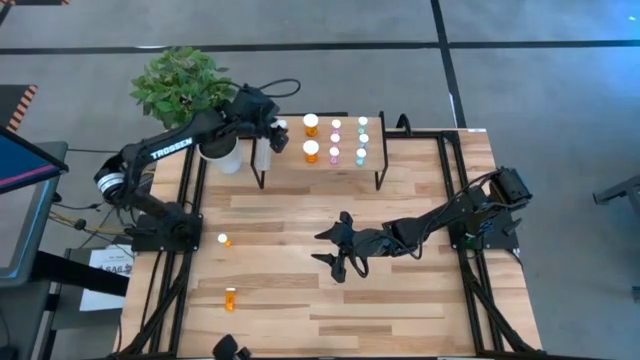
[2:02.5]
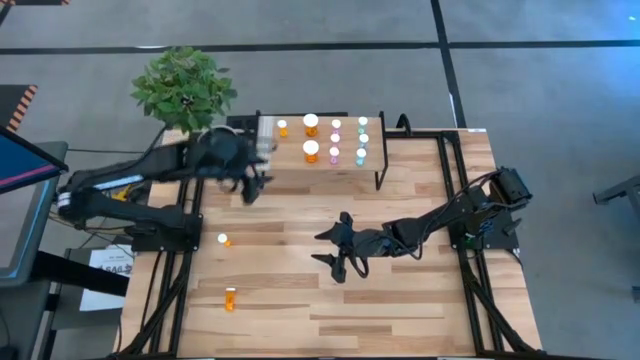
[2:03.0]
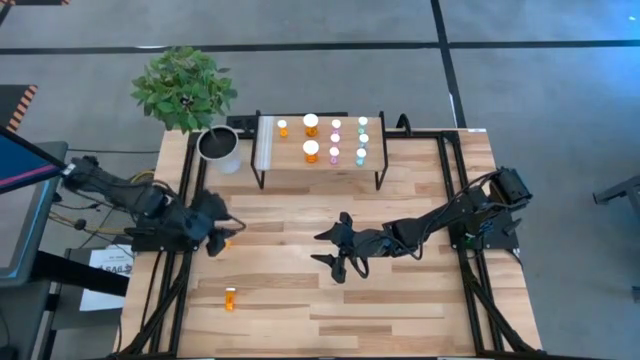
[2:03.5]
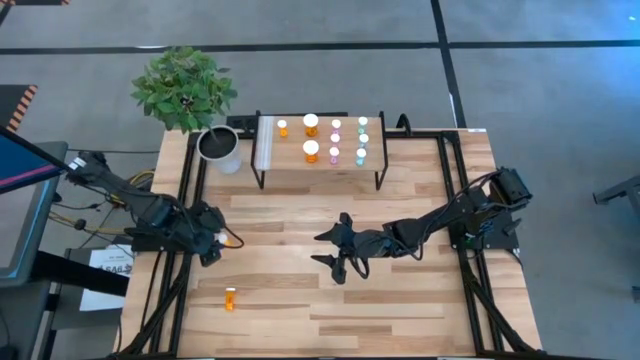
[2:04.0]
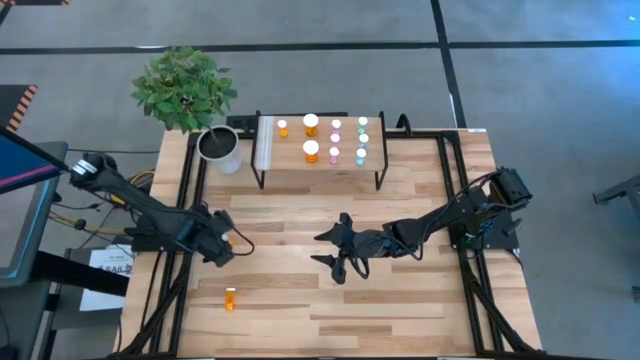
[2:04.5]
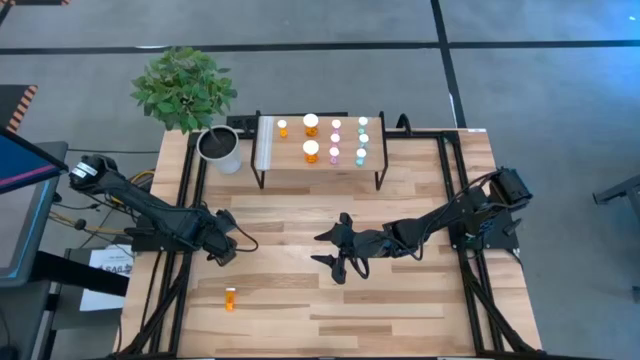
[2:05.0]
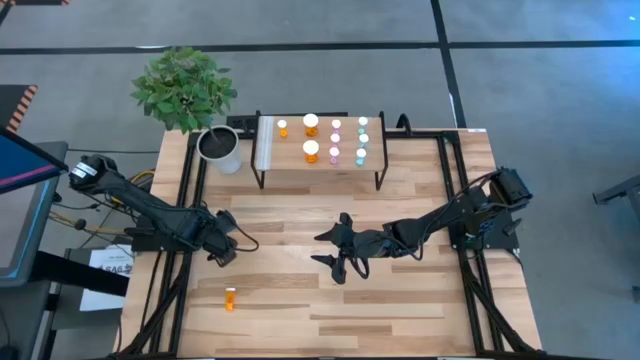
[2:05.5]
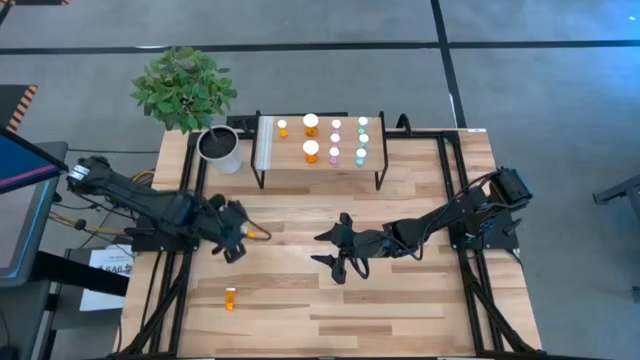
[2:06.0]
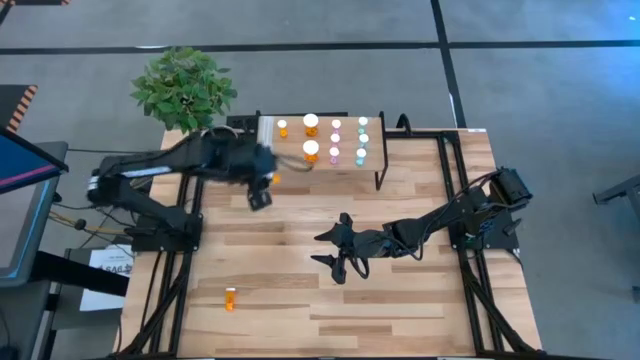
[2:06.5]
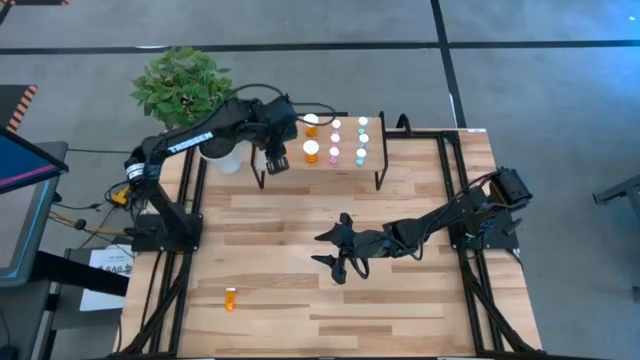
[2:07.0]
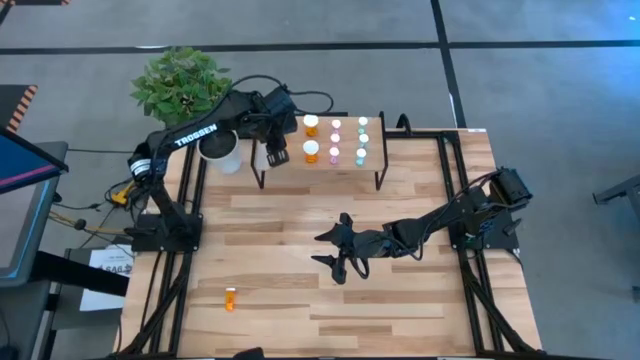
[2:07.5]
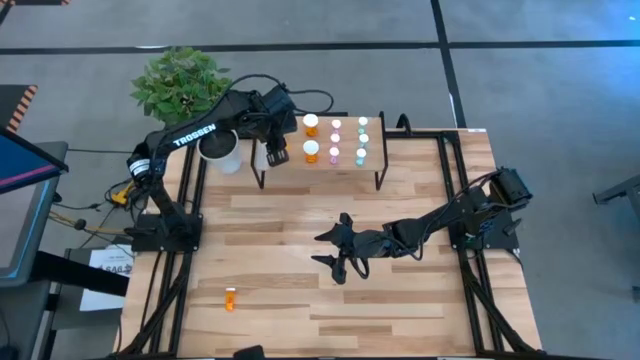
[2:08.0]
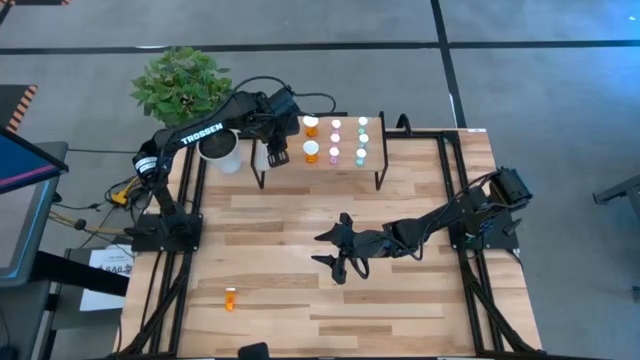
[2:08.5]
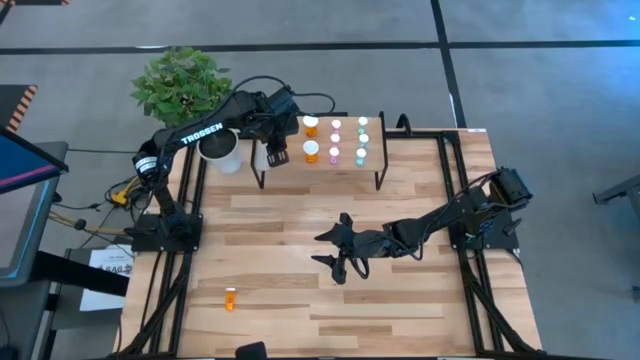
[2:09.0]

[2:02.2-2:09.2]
Task: Pick and place medicine bottles onto shelf by color
Put the top small orange pill bottle on the shelf aligned with the other small orange pill bottle

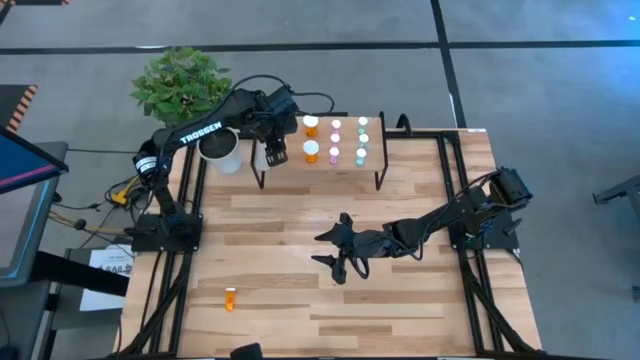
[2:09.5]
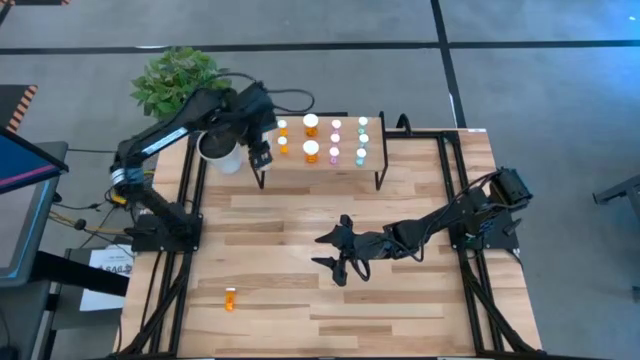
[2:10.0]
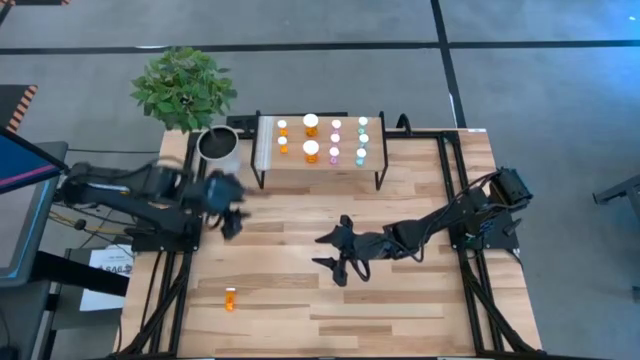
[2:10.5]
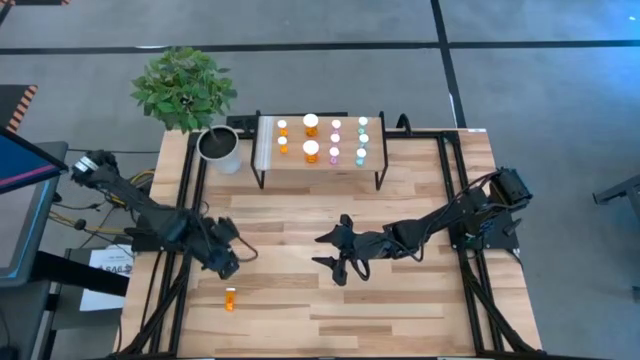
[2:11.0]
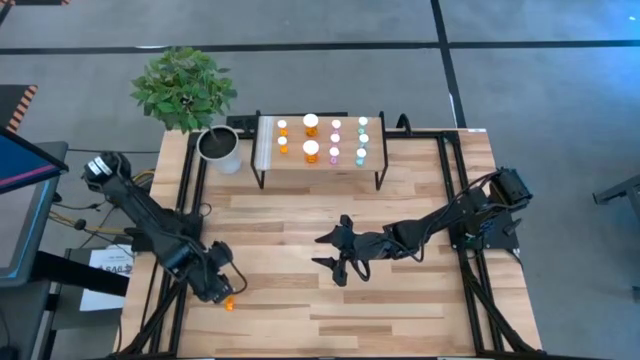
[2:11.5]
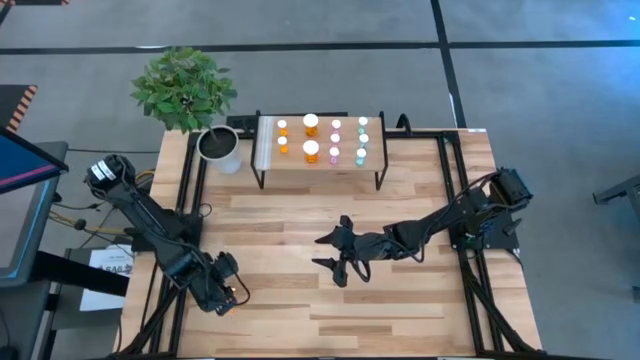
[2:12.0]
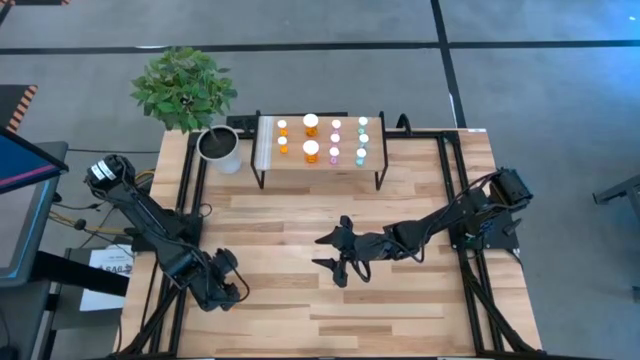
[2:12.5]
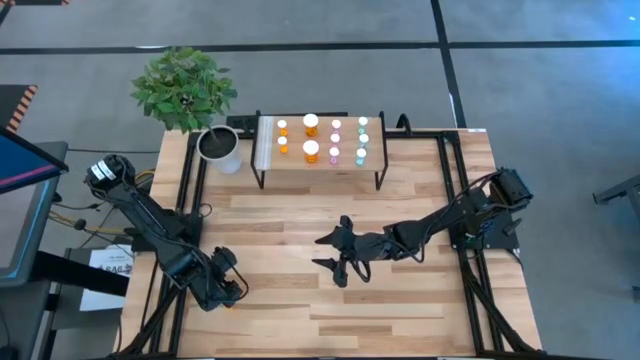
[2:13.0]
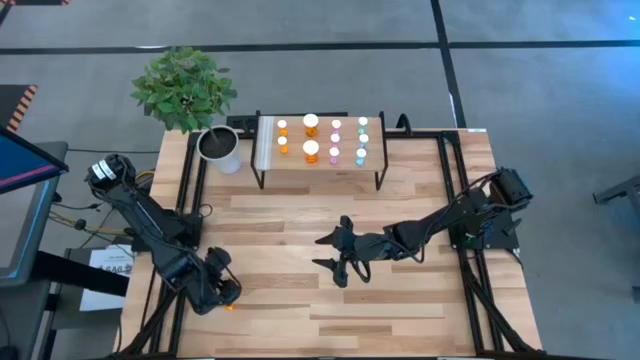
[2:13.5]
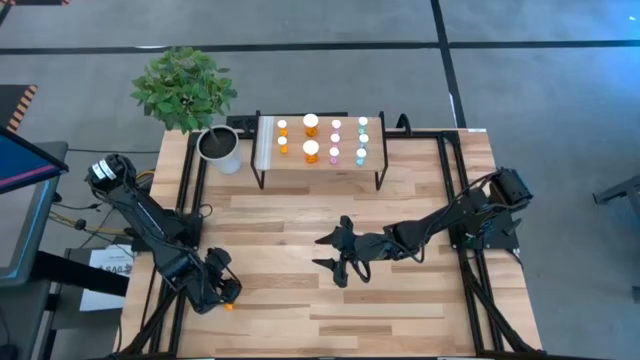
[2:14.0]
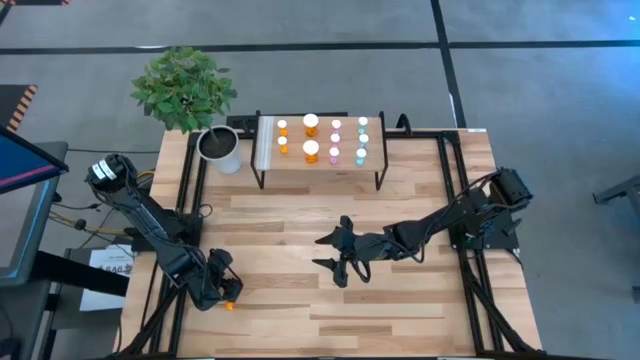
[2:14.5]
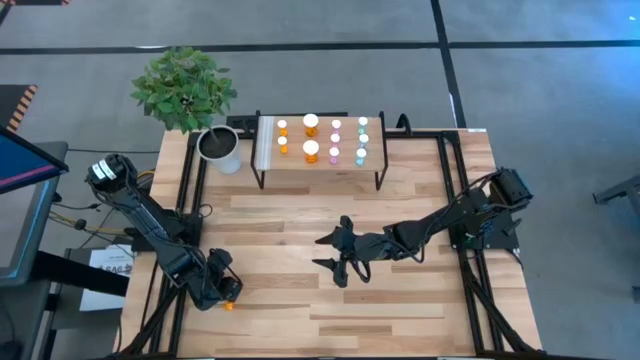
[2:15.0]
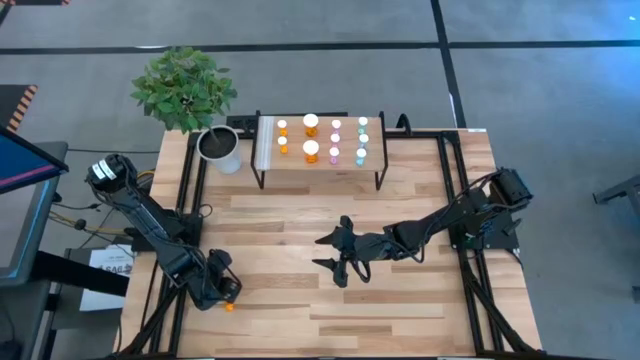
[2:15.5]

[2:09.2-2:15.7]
Put the small orange pill bottle on the shelf aligned with the other small orange pill bottles

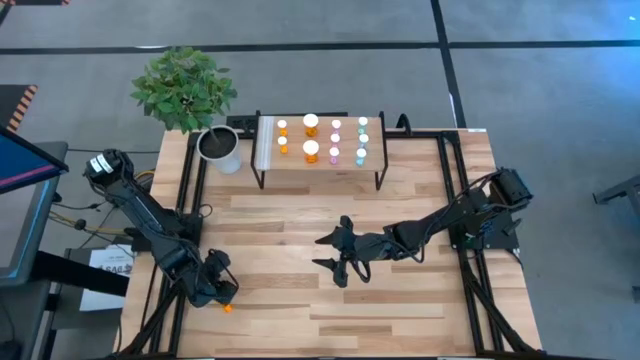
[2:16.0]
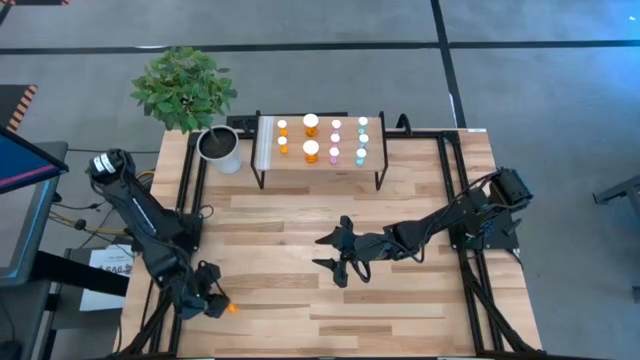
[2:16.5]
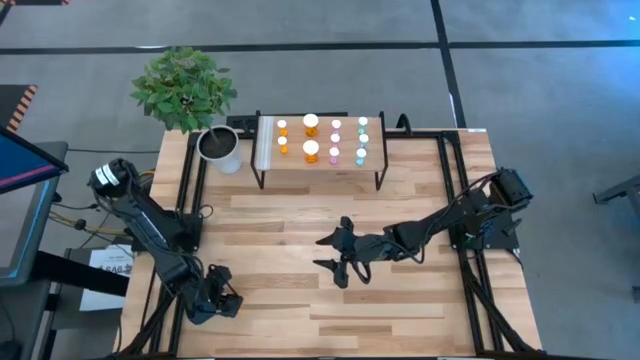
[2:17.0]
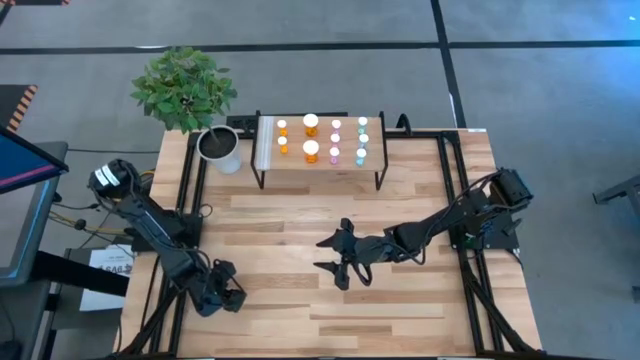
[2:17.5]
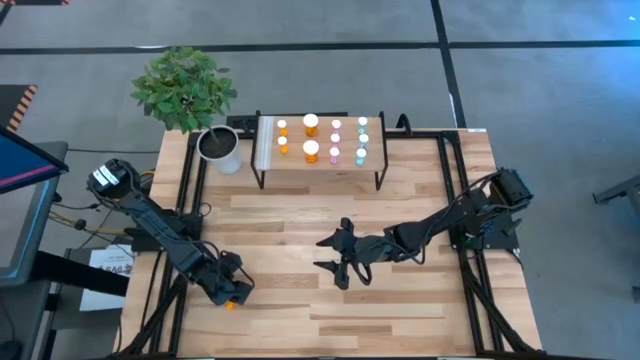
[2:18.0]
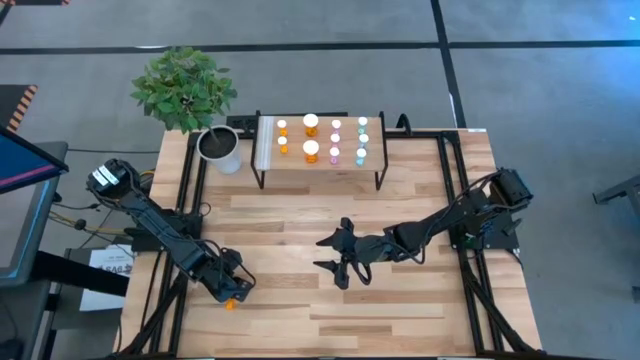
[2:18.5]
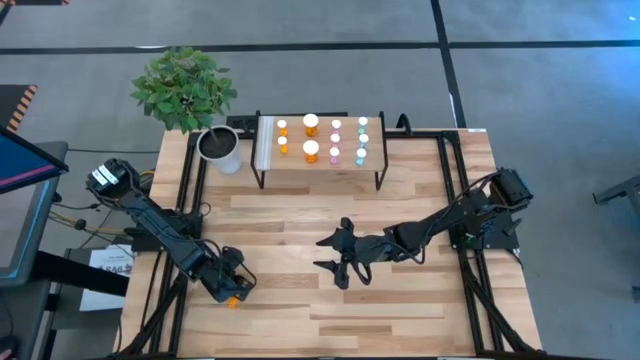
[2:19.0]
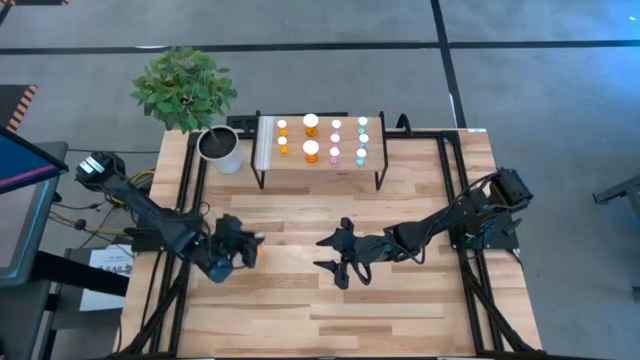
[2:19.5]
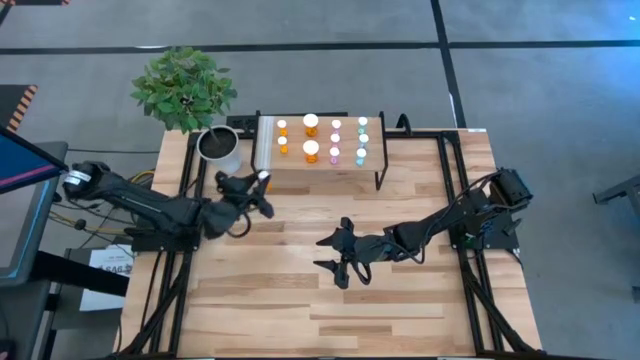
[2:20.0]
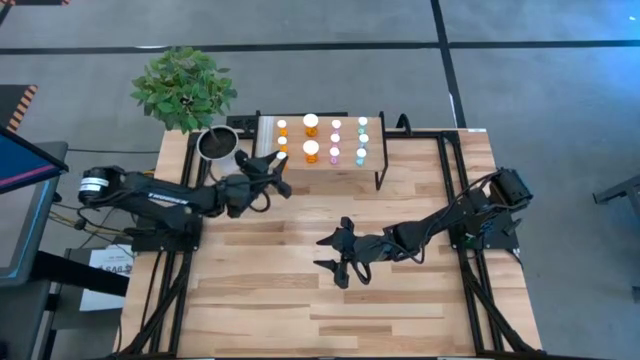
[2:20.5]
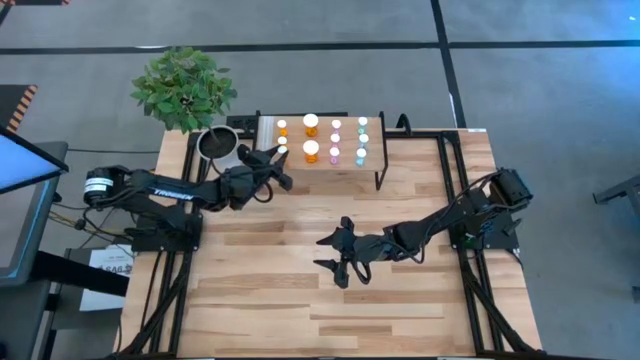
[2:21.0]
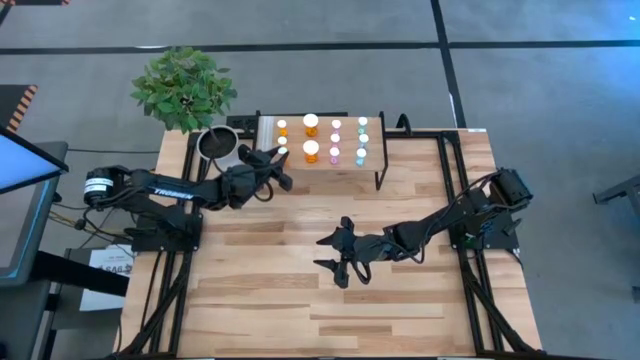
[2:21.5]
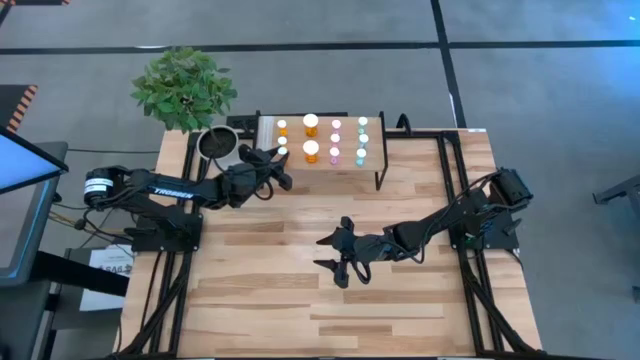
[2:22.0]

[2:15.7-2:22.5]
Put the small orange pill bottle on the shelf aligned with the other small orange pill bottles

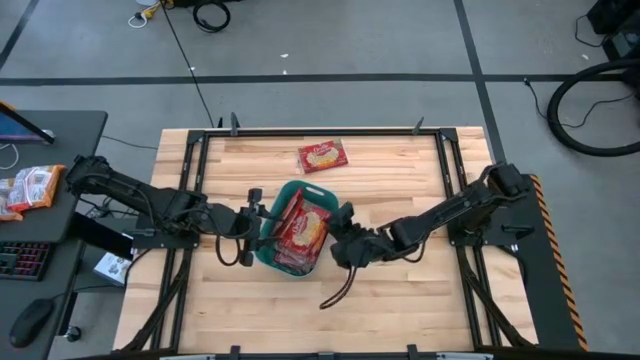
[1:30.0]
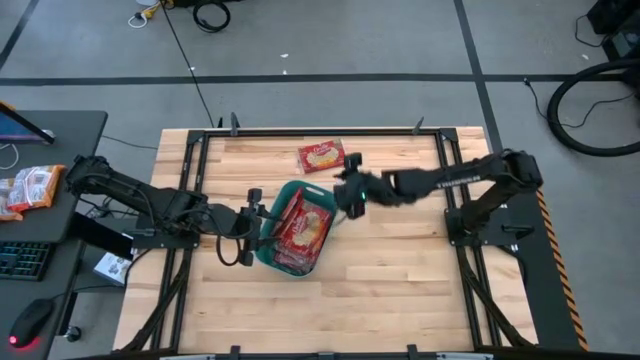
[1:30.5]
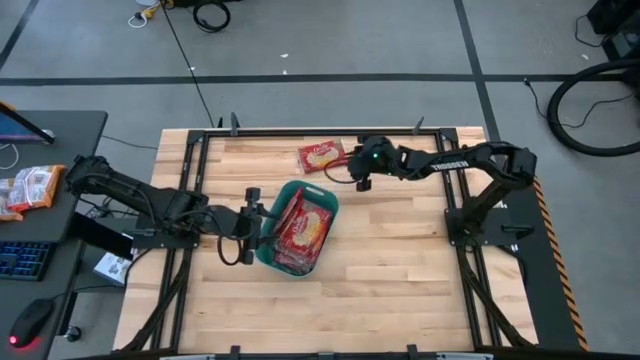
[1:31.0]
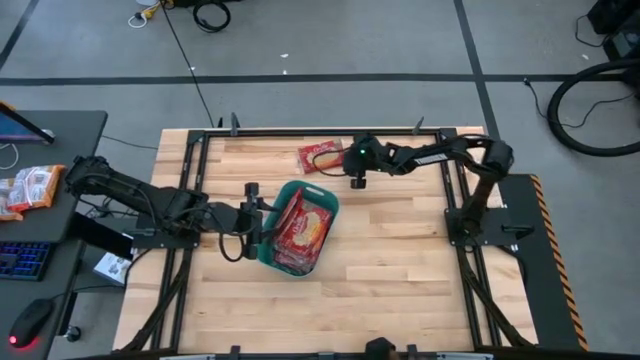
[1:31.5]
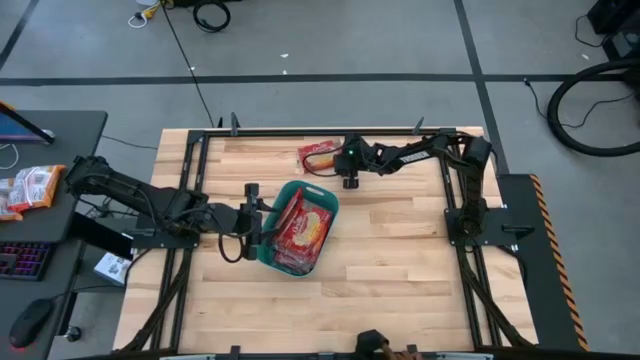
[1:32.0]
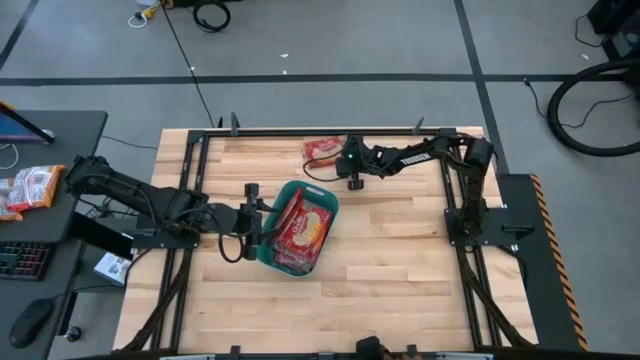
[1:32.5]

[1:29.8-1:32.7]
Task: Sort popcorn bags into baskets
Put the red popcorn bag into the green bin
